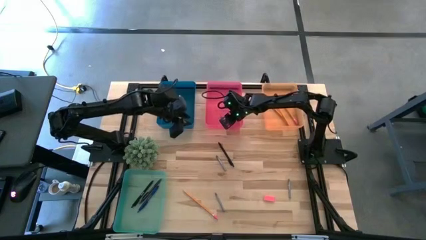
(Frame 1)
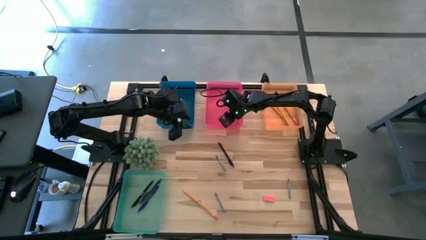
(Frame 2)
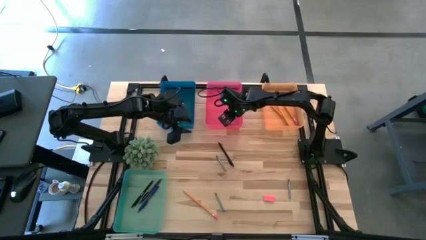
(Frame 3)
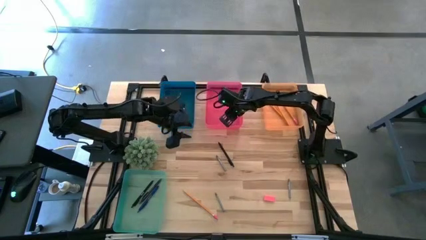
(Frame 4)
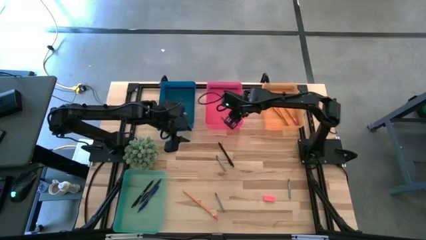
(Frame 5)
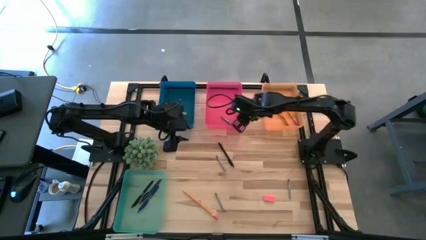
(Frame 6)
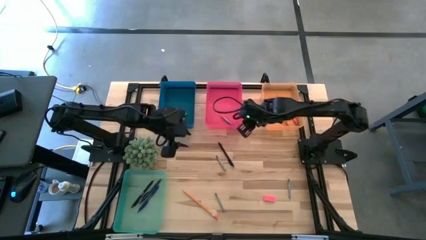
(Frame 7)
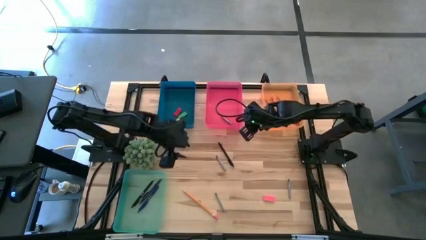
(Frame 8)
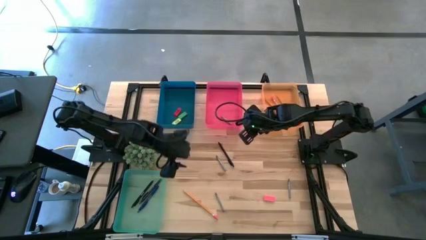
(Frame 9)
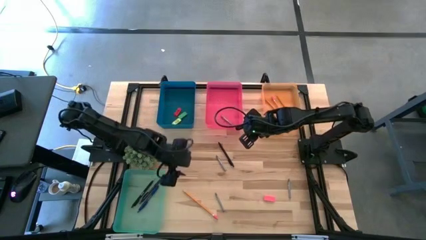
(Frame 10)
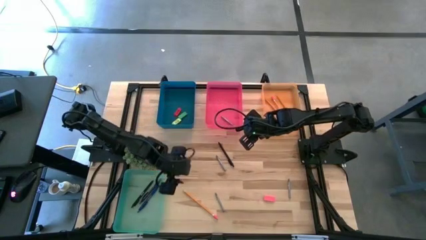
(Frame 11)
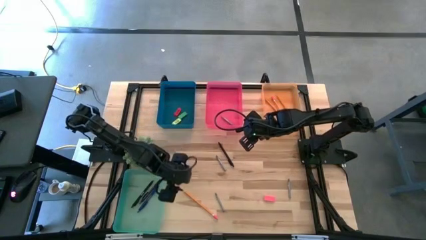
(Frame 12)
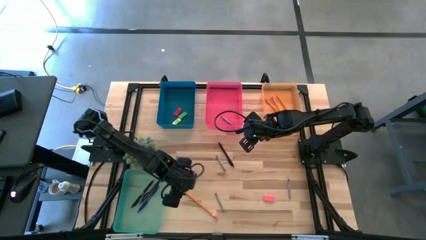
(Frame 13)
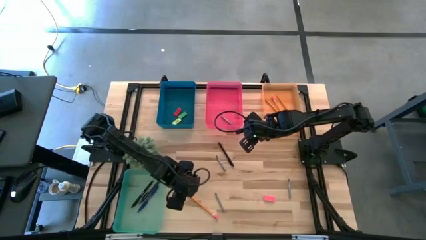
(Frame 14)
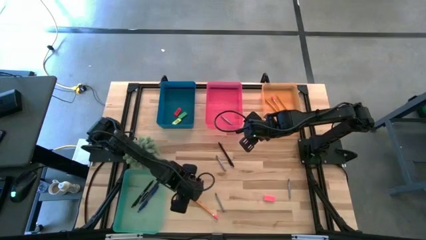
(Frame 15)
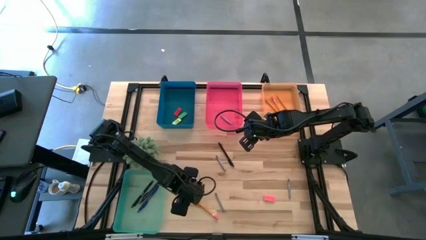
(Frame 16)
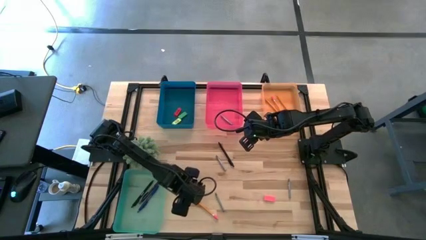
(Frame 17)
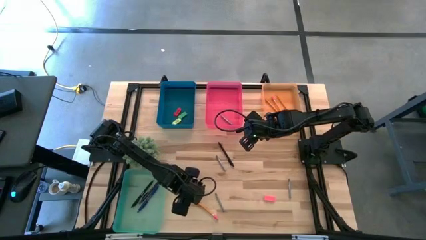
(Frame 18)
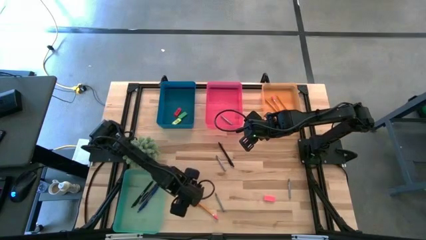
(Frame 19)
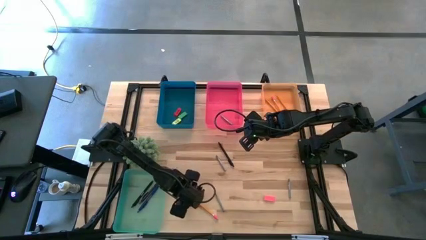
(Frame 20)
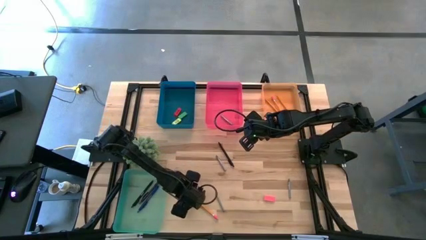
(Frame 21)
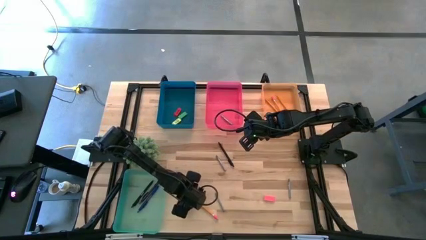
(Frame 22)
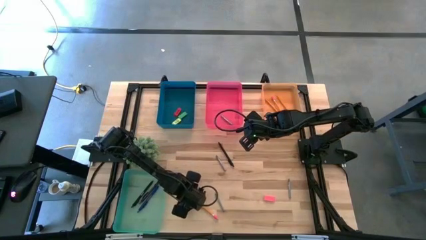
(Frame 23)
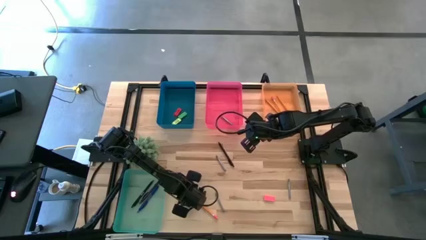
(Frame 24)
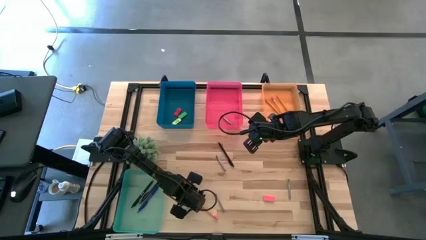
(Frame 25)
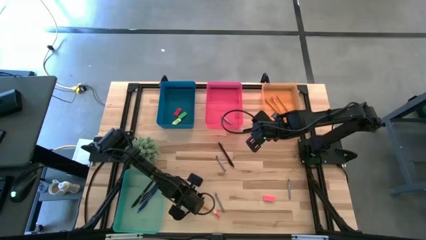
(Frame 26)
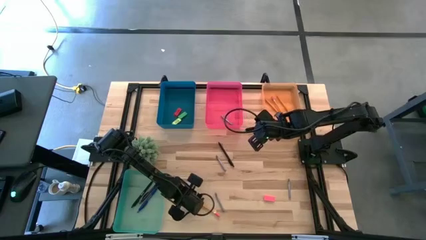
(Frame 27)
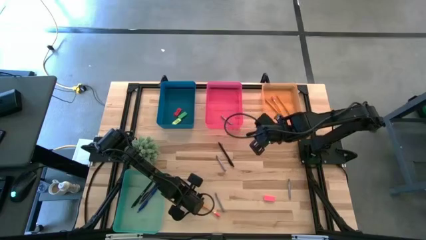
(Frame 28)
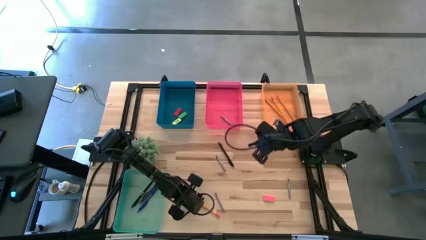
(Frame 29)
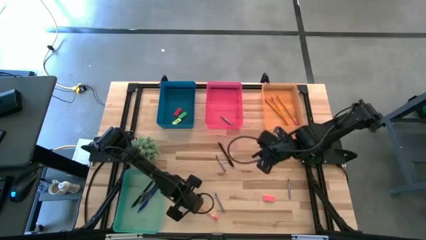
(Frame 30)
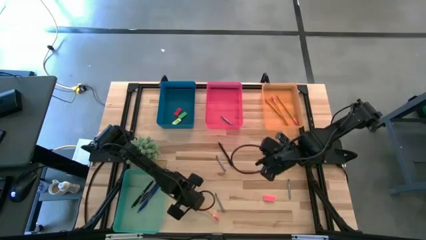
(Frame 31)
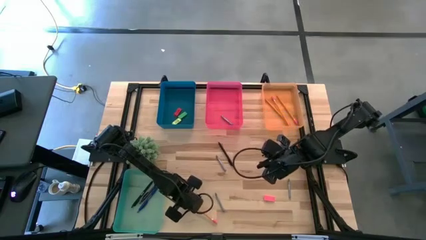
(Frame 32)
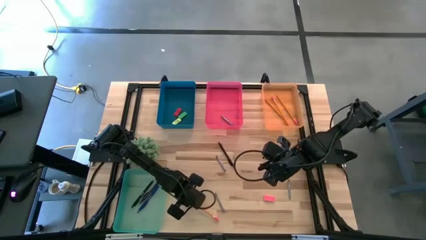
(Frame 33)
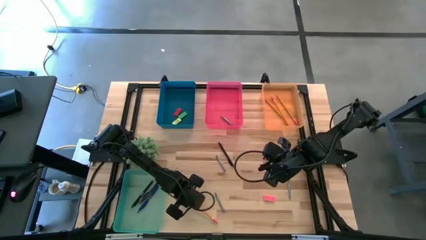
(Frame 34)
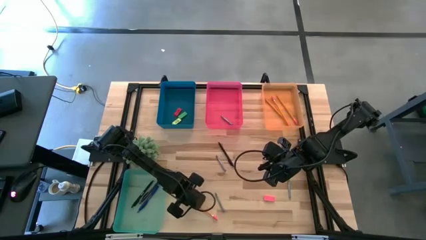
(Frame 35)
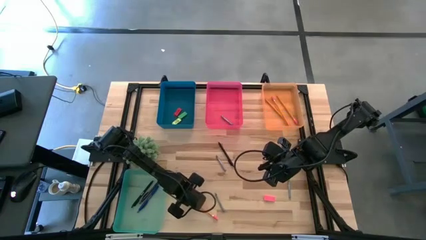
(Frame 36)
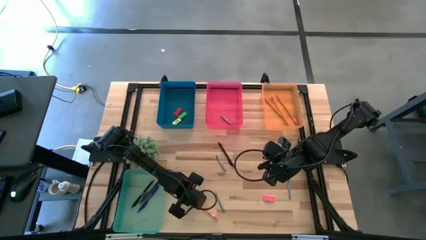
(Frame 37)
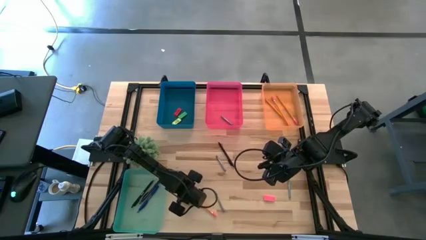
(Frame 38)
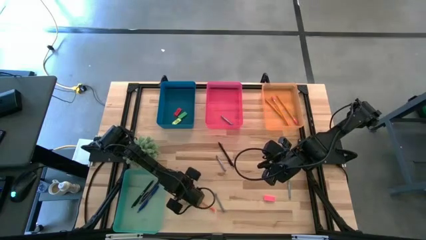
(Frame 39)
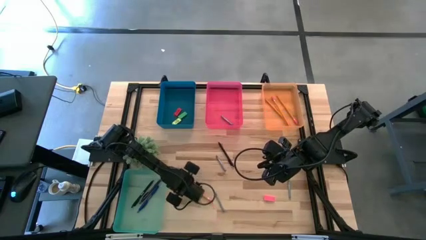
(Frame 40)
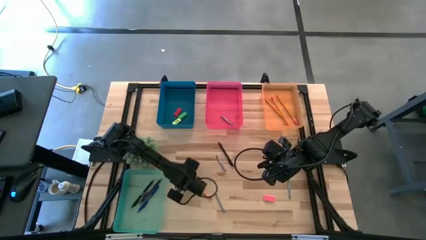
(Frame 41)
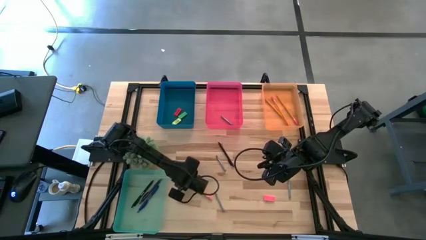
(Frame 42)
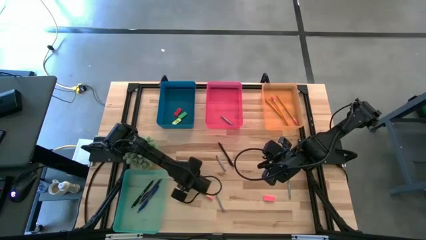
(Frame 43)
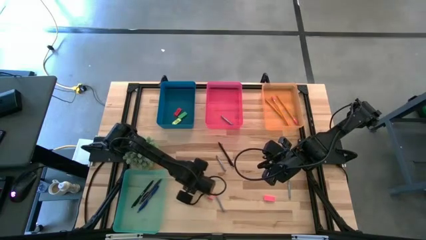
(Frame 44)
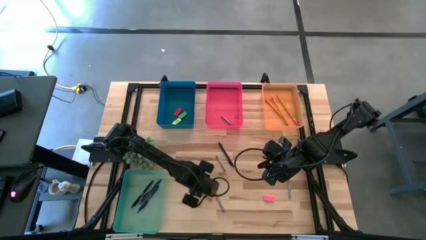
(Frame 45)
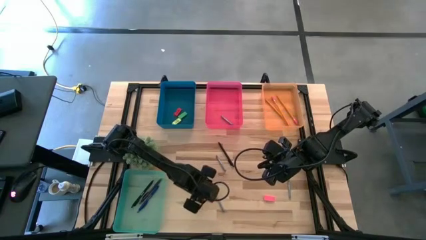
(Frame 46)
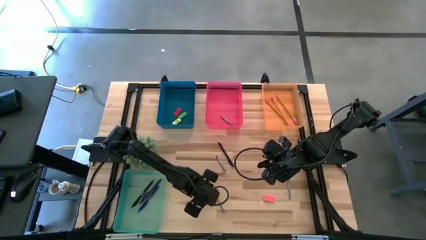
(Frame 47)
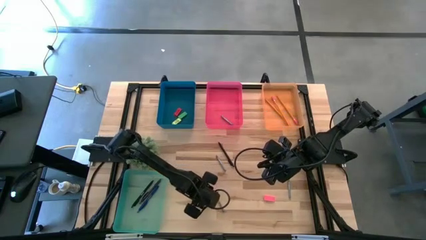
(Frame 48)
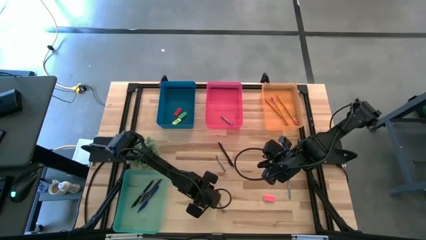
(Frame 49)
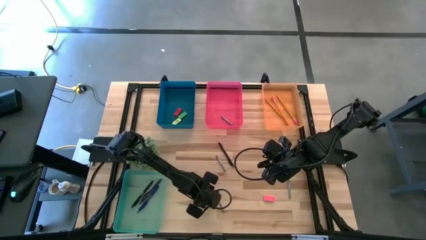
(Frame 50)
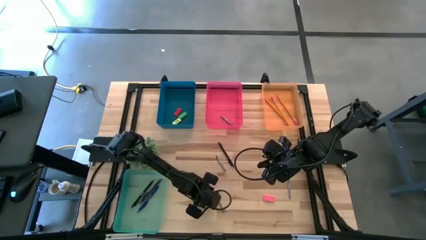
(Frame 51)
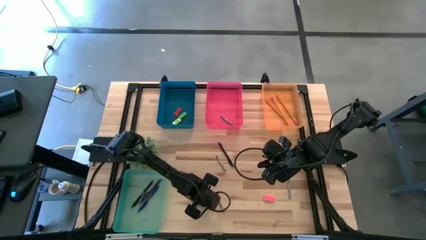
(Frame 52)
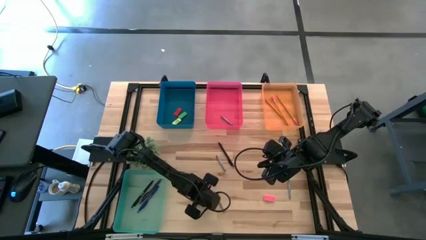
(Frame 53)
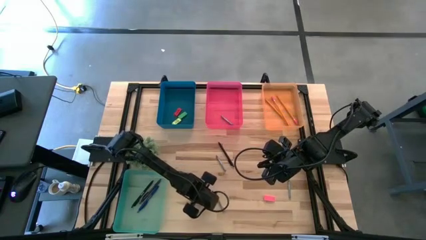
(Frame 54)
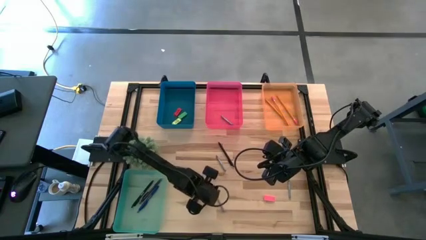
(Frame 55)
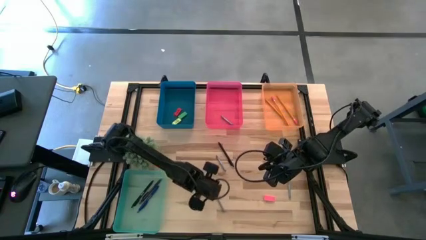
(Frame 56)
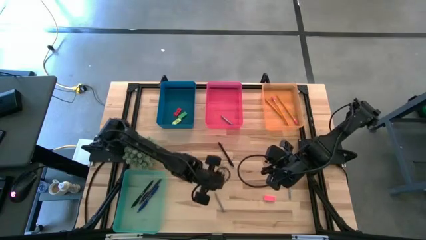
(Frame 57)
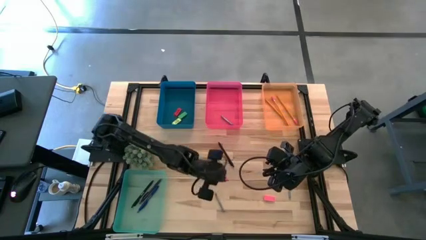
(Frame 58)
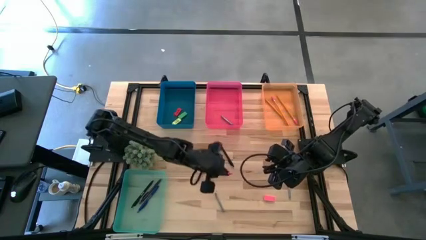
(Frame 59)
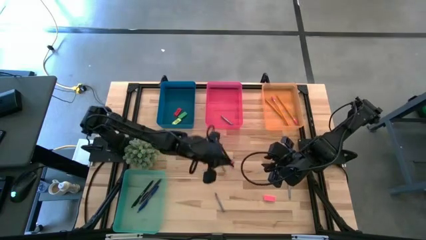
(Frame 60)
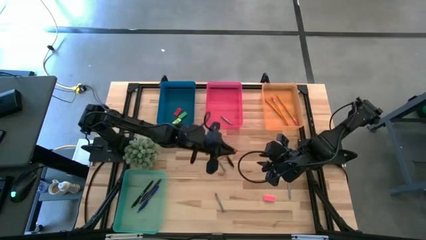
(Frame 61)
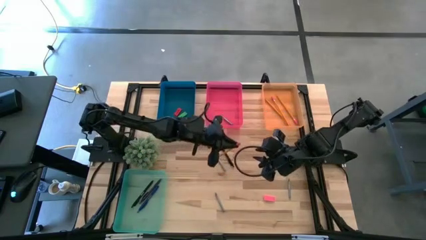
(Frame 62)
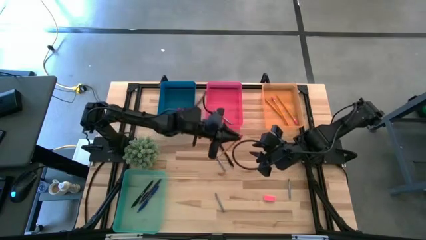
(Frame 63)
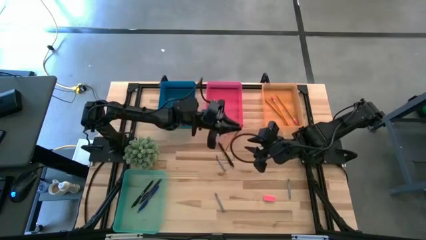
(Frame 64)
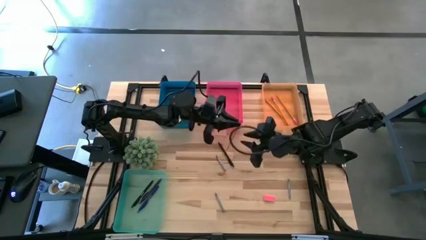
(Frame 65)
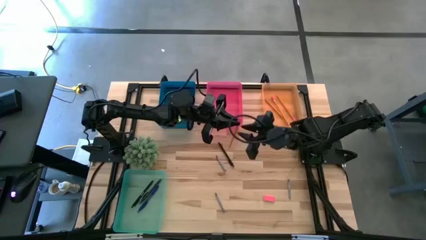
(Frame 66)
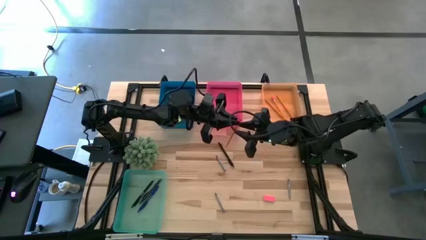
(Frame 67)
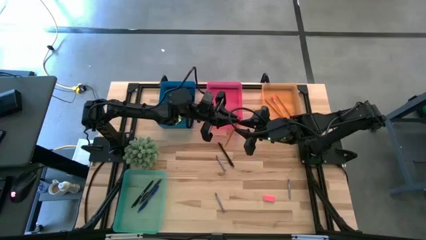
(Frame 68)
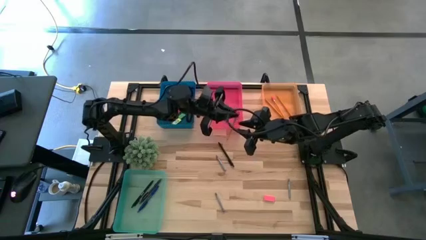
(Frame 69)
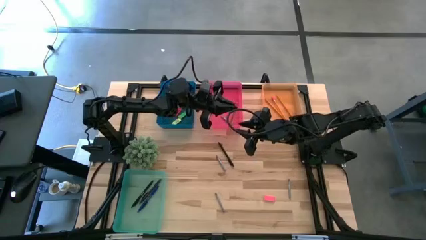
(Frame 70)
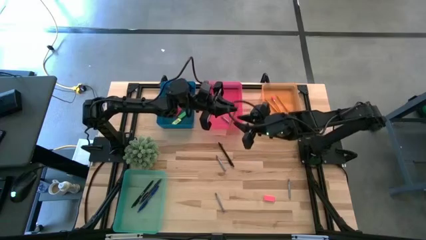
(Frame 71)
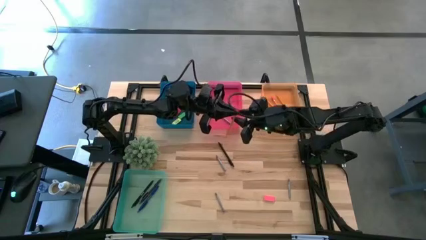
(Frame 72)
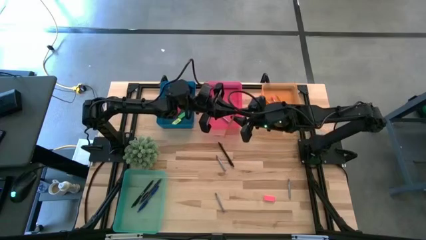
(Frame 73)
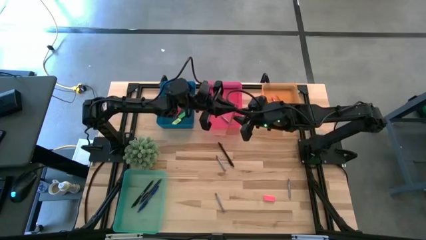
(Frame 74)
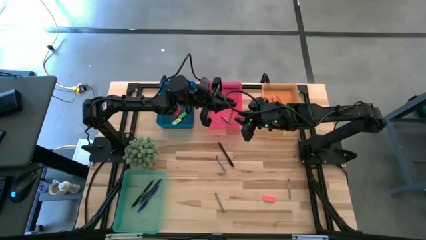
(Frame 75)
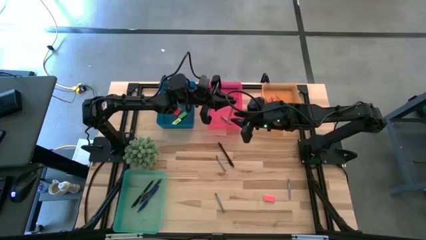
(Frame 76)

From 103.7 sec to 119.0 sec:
Task: Sort crayons/erasers/pens/pencils in bins
Put the pencil into the transparent orange bin
